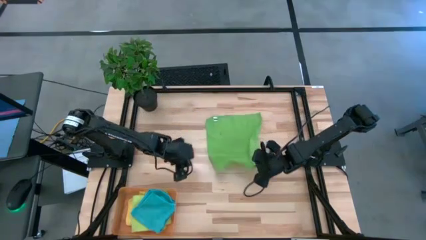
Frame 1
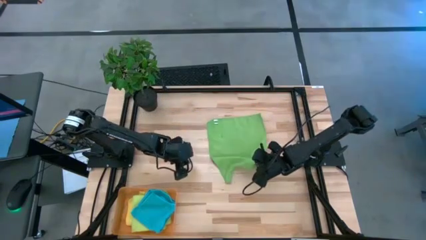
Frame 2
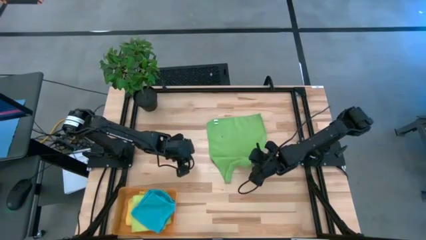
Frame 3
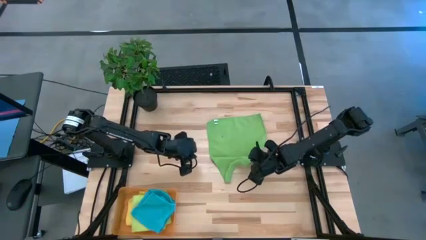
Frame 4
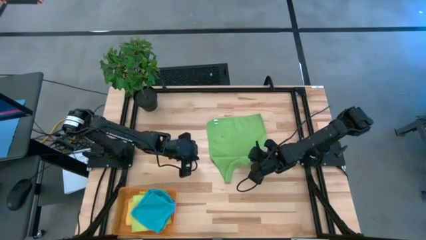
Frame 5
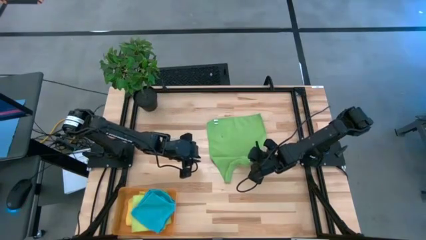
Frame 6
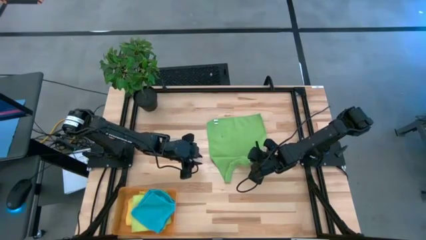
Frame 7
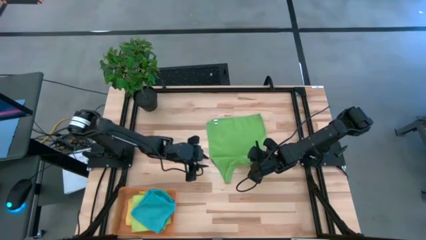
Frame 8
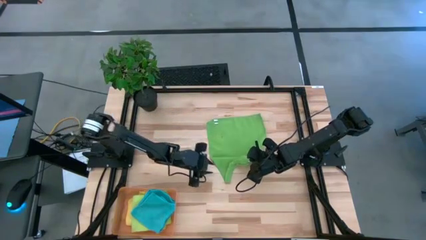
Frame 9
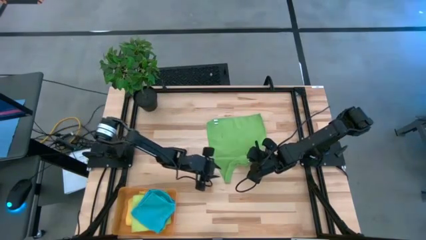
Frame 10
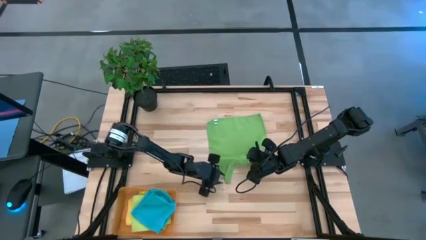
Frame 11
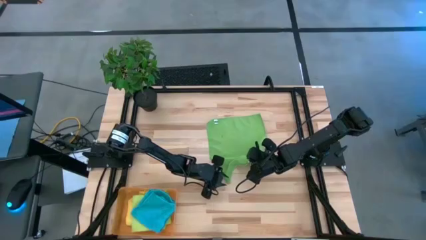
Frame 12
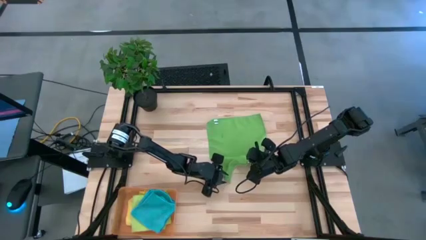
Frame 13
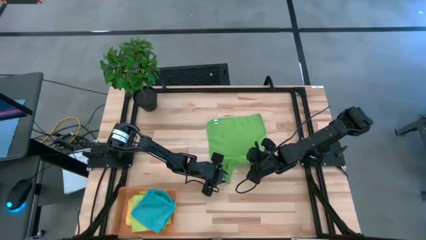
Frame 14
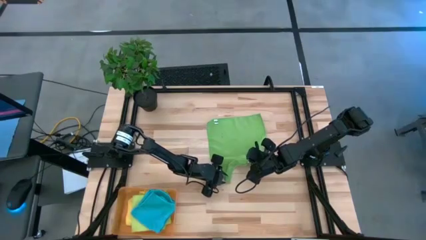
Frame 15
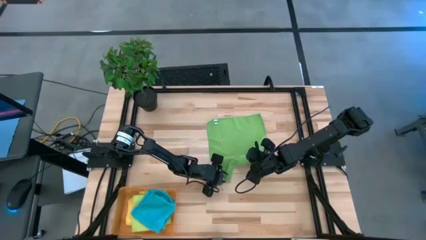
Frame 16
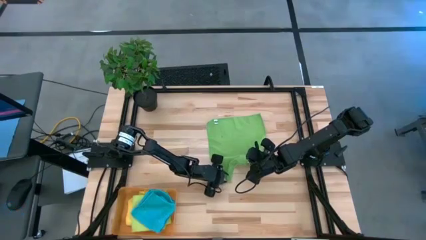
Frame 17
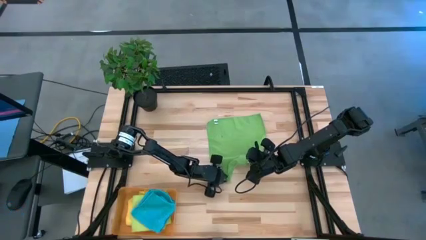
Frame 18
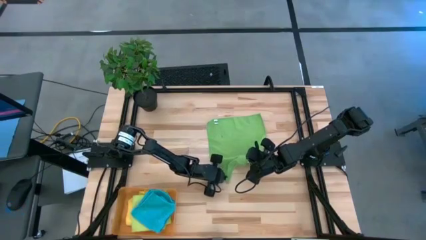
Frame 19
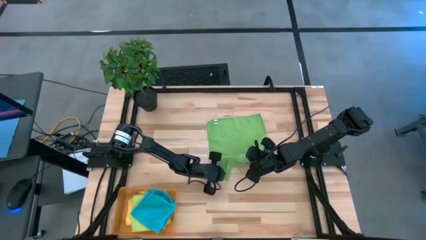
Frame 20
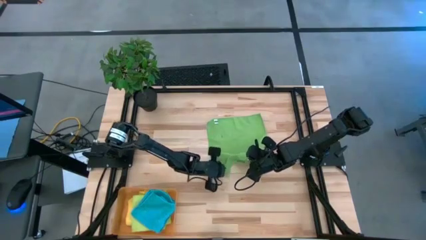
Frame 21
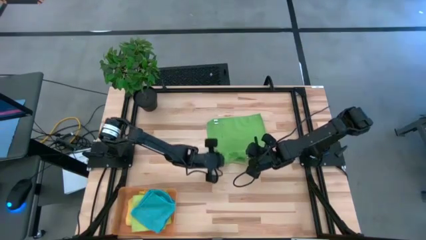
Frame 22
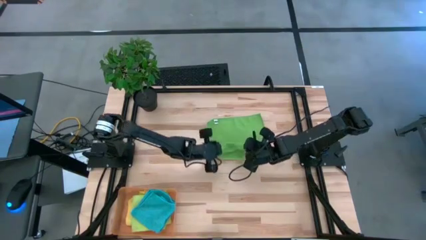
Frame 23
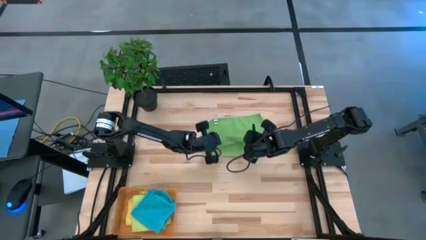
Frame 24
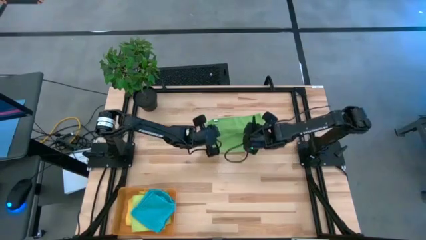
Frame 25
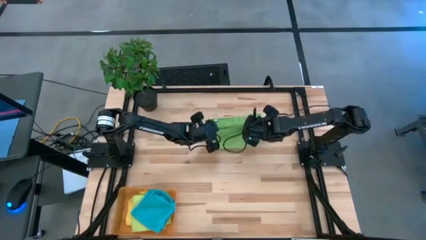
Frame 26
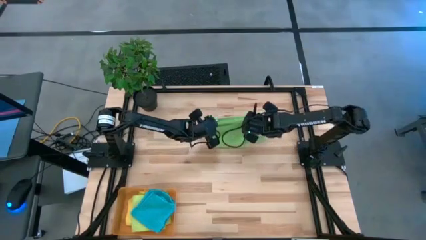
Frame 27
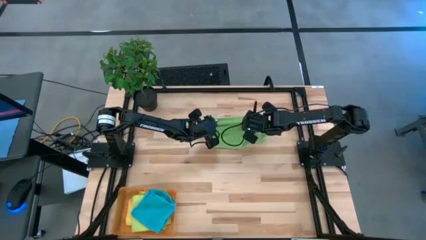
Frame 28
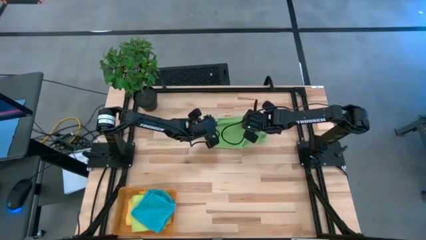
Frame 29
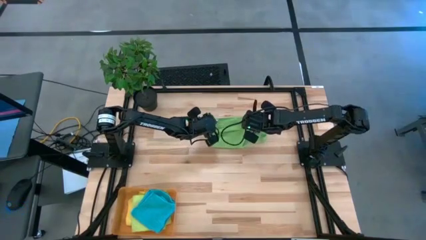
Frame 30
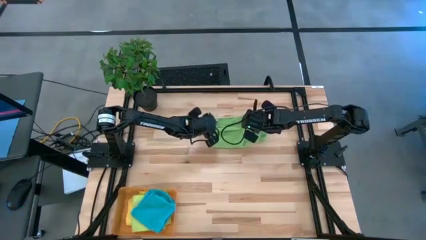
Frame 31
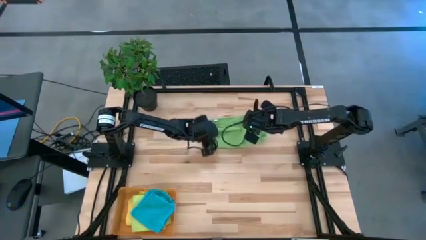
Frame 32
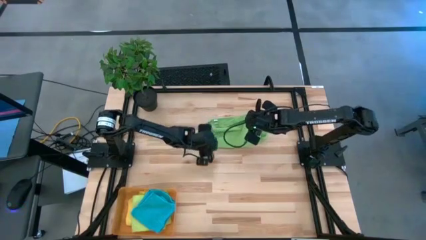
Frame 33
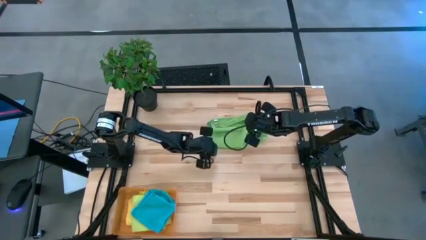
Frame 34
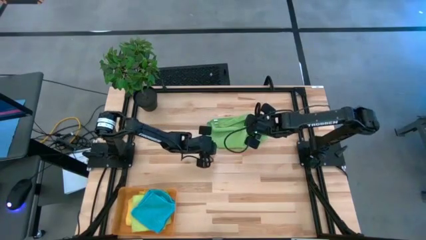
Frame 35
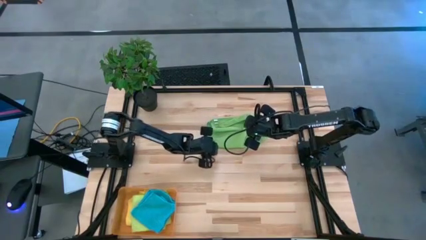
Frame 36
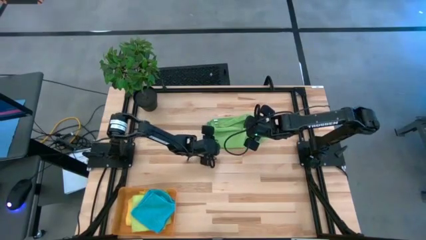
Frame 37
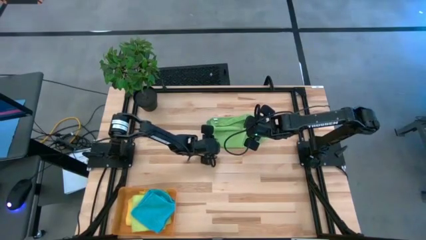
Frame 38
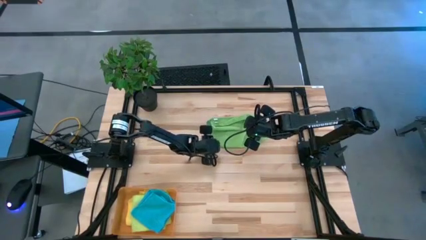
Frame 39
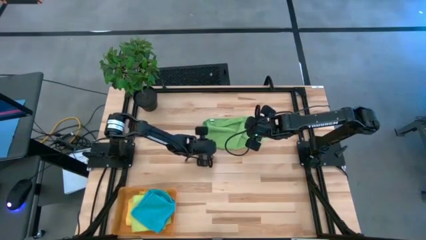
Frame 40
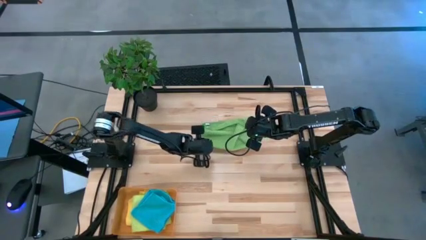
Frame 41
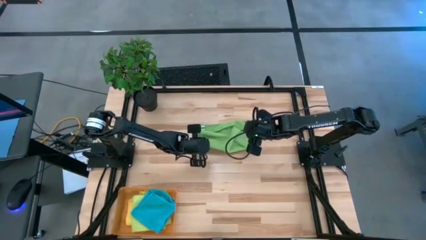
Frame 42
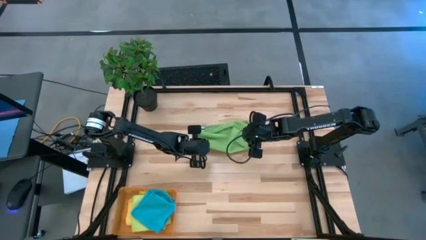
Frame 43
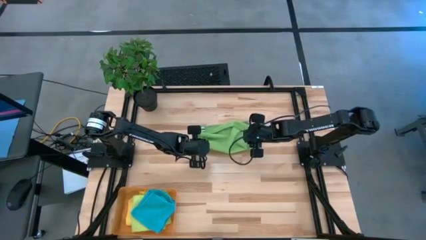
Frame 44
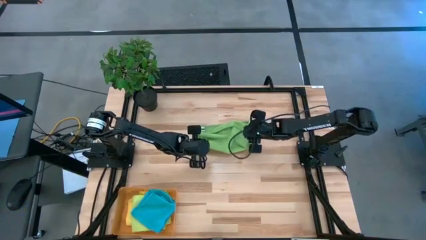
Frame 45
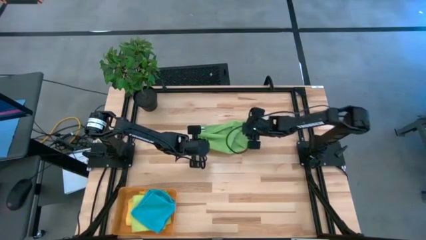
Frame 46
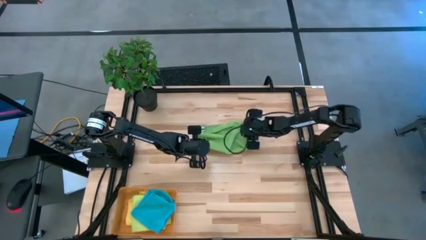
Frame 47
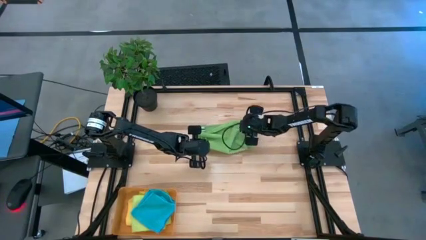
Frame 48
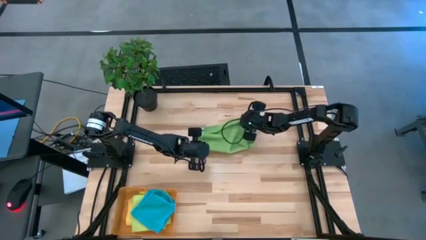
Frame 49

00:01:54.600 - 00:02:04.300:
Task: Fold microfiber towels
Fold the green towel

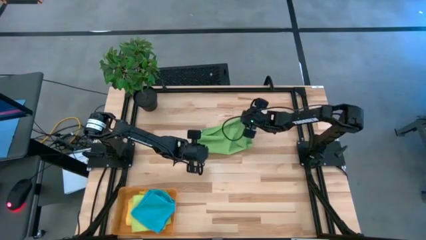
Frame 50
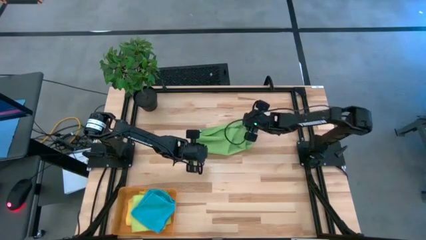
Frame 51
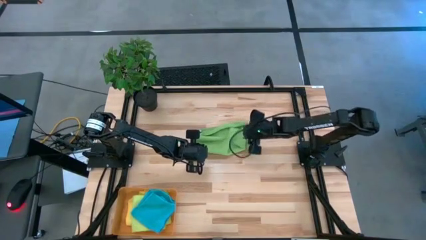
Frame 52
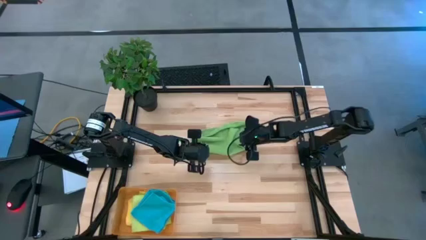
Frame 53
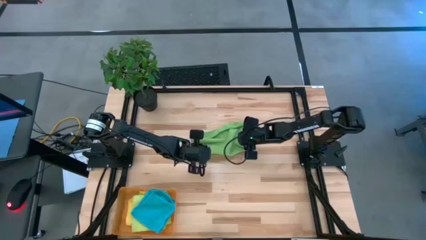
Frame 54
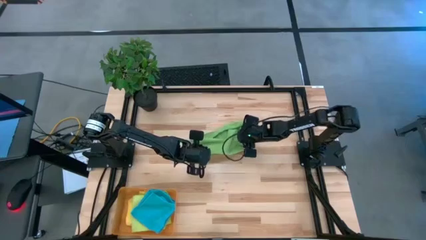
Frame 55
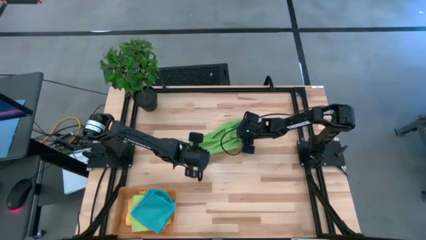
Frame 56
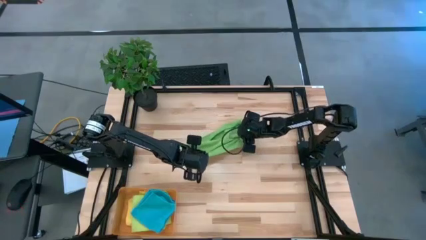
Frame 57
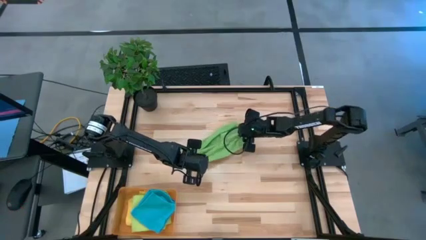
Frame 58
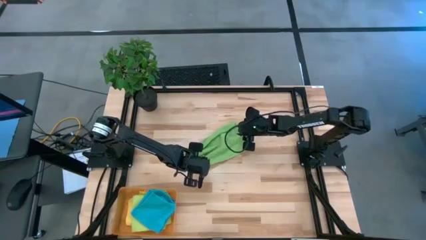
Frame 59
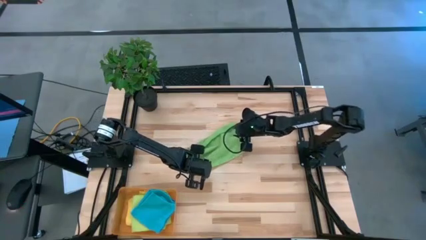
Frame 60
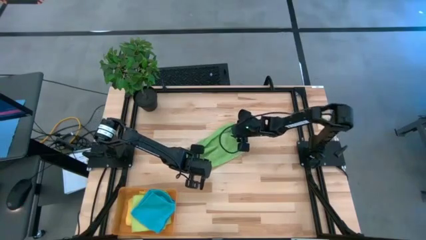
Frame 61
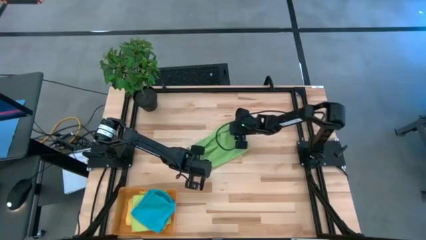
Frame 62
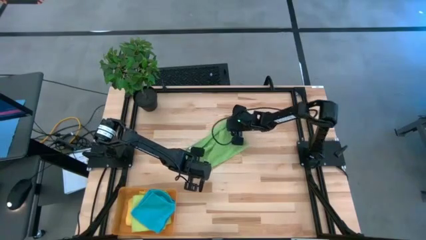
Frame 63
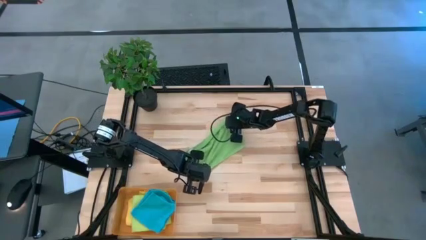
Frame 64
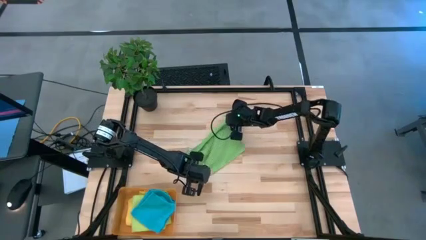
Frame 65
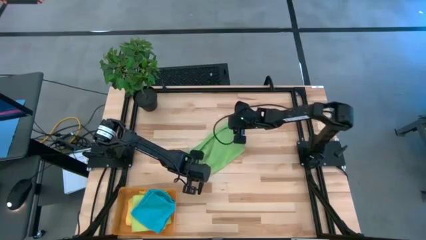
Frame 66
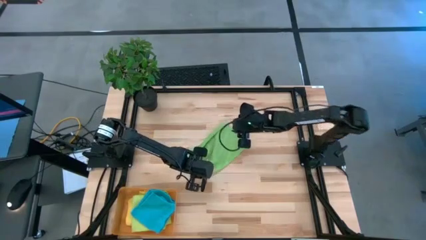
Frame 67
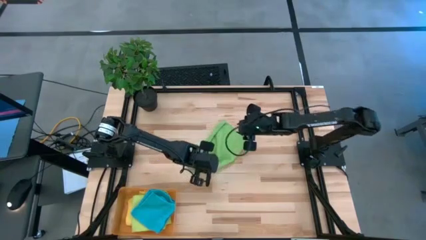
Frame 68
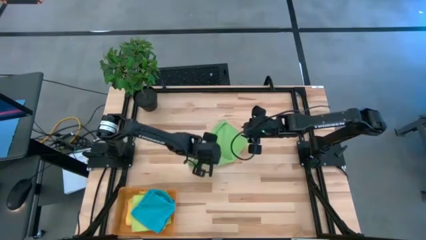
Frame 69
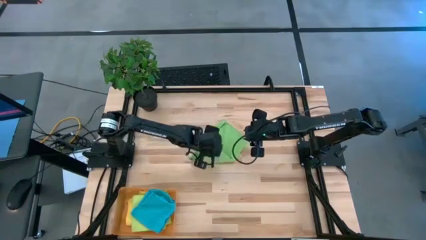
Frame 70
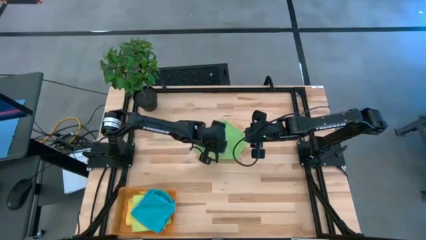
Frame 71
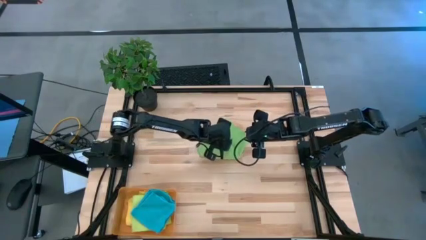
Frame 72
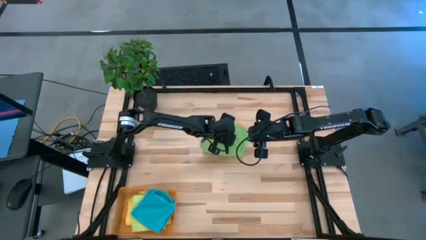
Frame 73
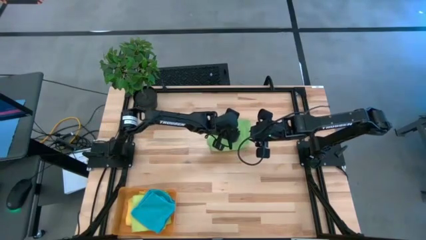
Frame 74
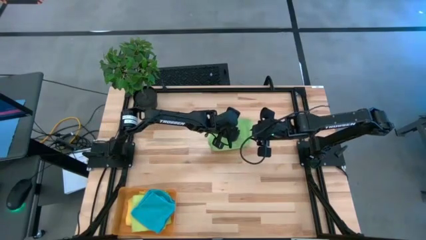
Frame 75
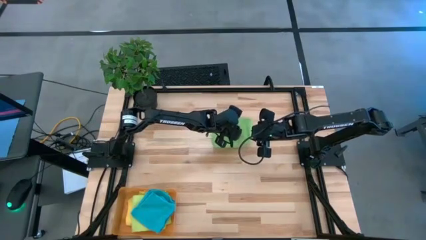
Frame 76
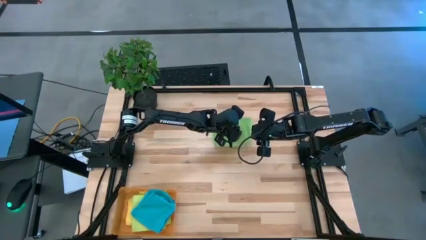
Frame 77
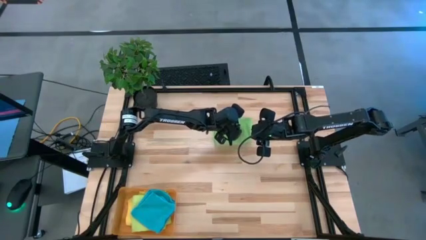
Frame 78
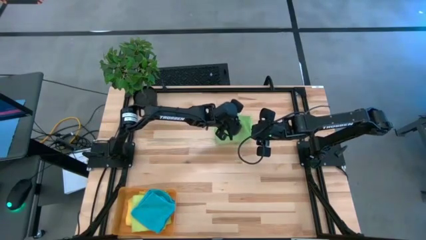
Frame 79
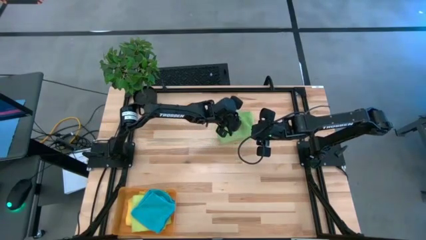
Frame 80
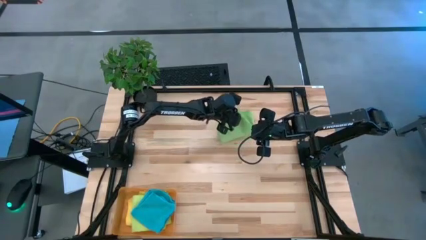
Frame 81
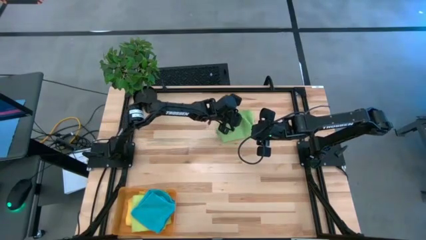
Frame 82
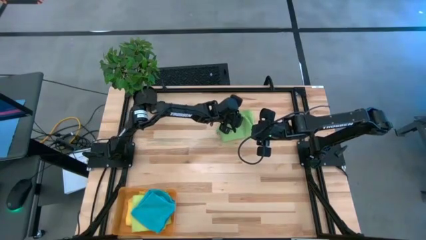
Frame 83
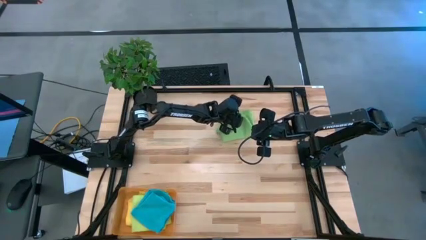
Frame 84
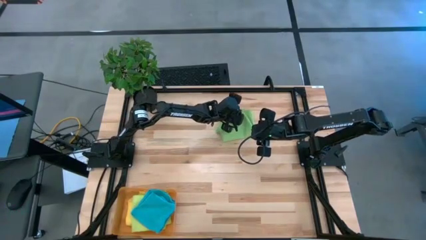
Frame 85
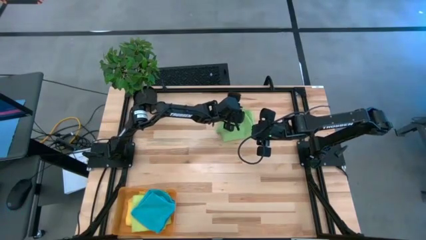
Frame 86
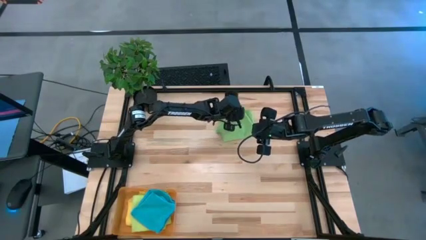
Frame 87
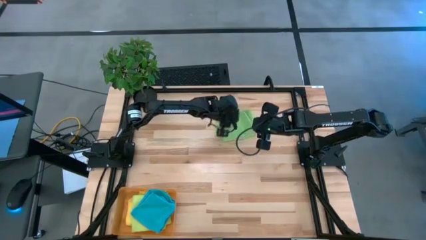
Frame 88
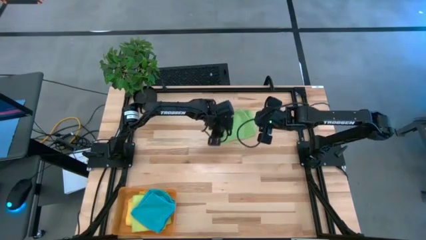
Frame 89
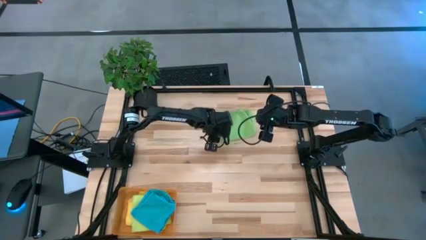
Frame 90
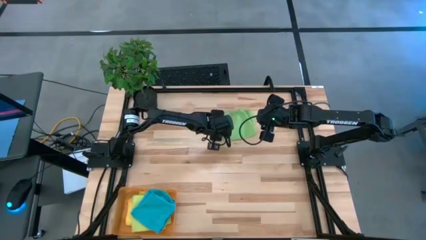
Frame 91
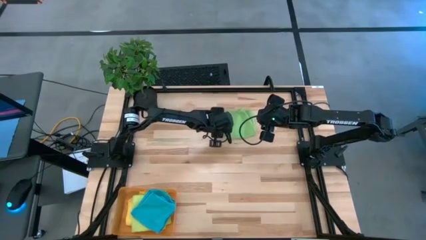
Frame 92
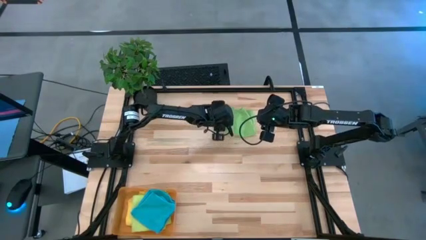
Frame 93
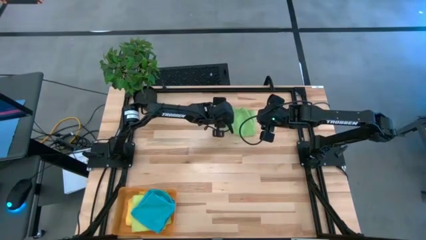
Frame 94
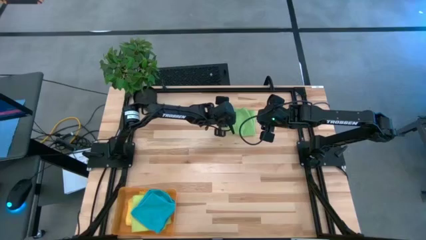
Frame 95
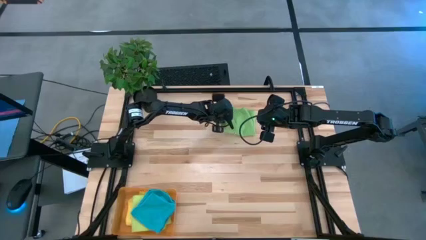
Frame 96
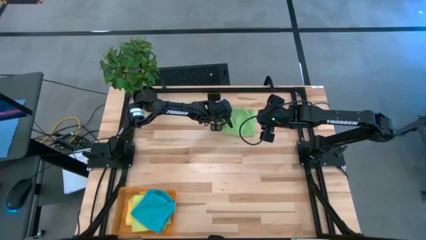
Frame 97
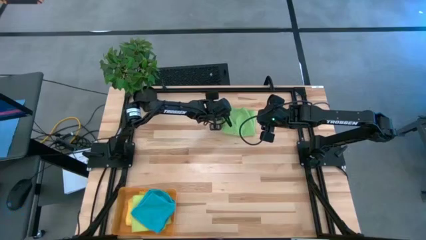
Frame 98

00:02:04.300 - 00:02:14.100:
Fold the green towel
